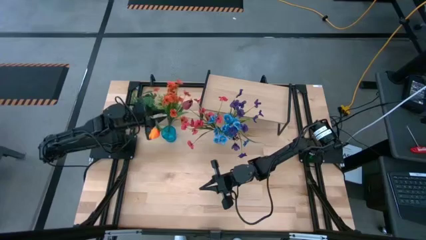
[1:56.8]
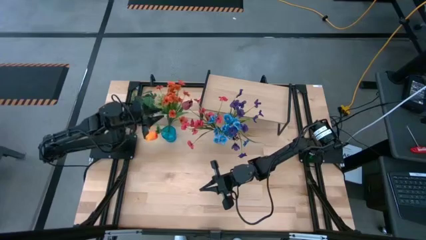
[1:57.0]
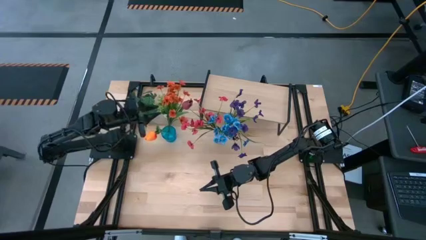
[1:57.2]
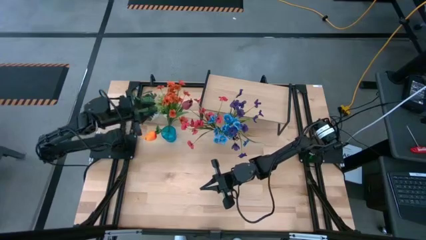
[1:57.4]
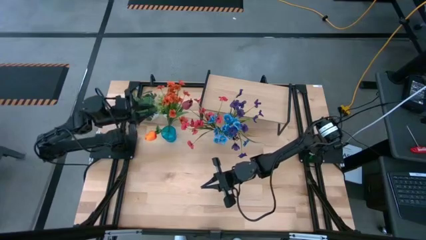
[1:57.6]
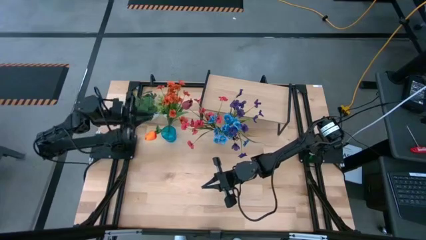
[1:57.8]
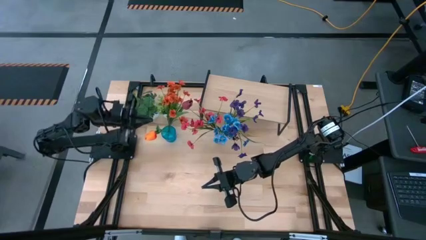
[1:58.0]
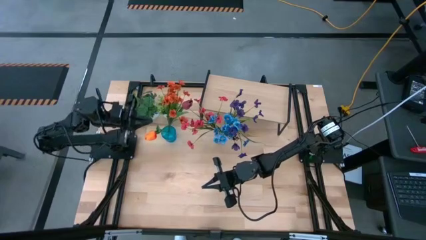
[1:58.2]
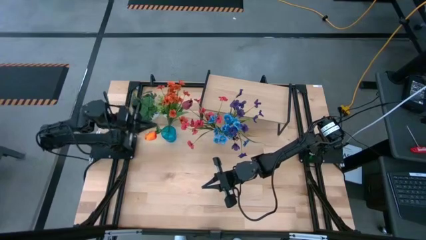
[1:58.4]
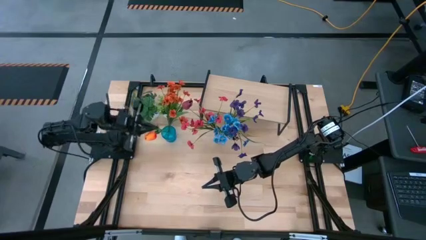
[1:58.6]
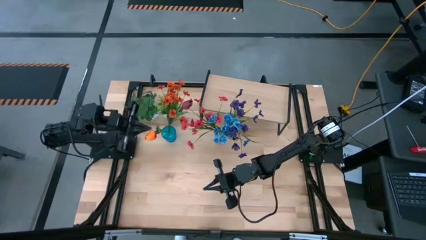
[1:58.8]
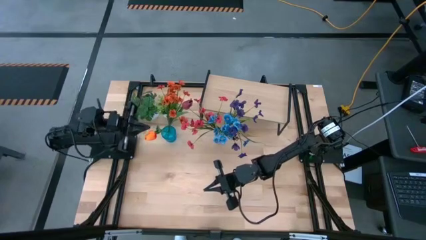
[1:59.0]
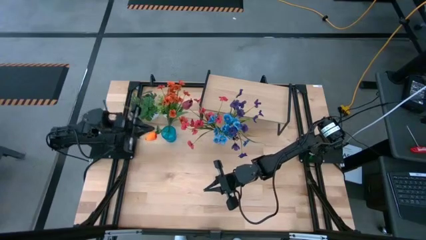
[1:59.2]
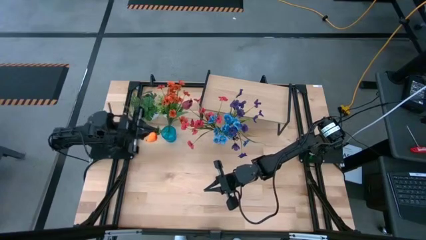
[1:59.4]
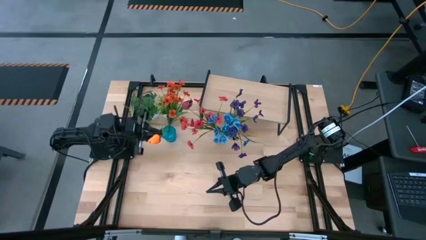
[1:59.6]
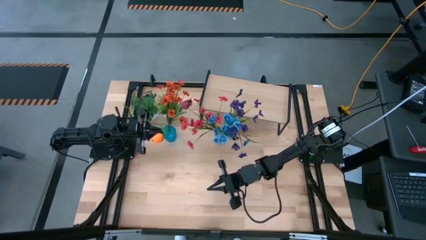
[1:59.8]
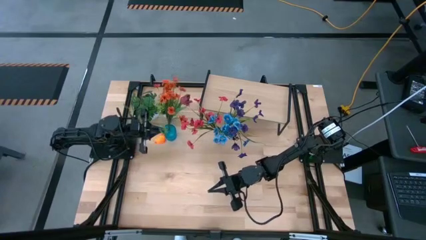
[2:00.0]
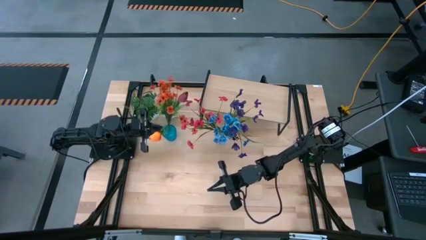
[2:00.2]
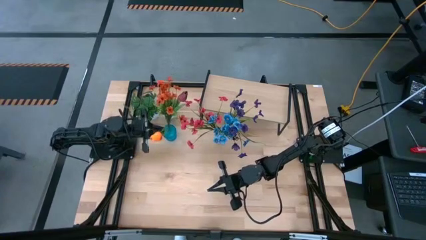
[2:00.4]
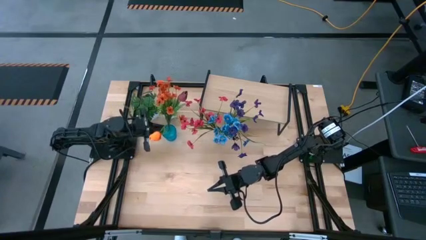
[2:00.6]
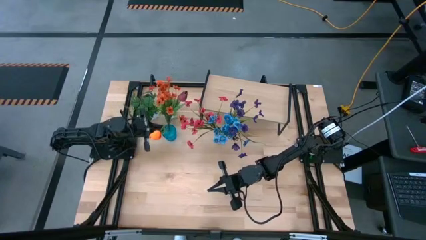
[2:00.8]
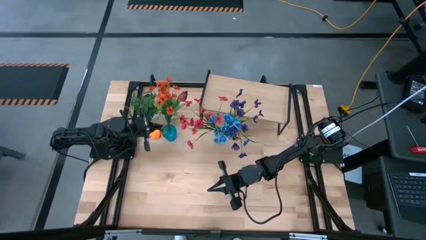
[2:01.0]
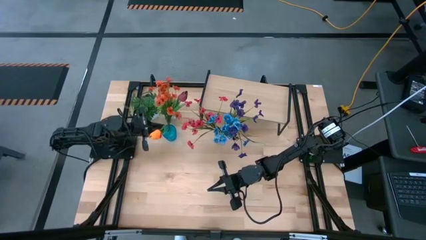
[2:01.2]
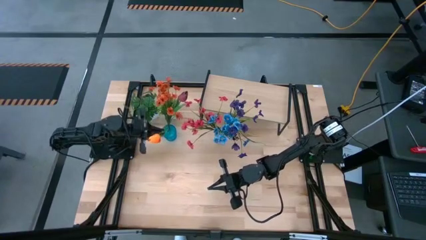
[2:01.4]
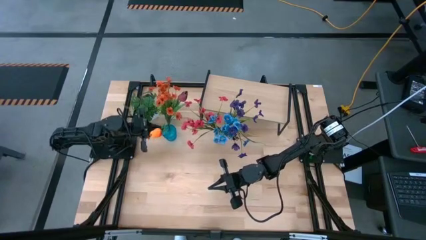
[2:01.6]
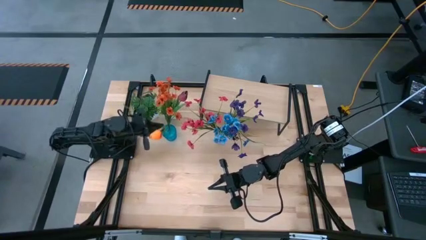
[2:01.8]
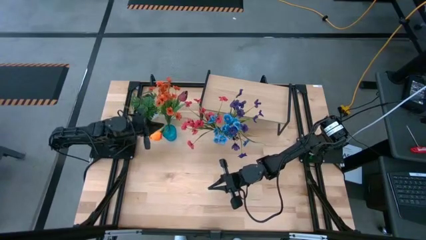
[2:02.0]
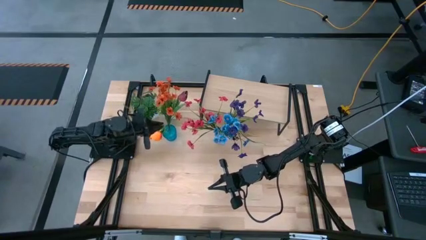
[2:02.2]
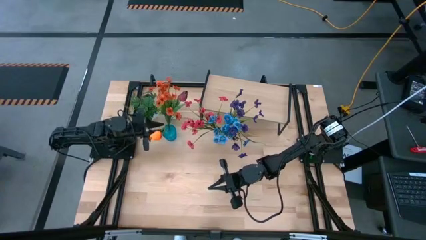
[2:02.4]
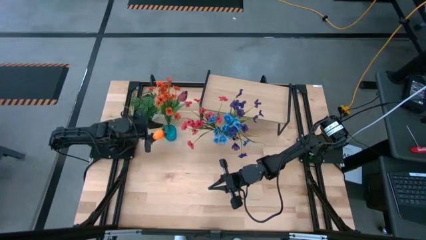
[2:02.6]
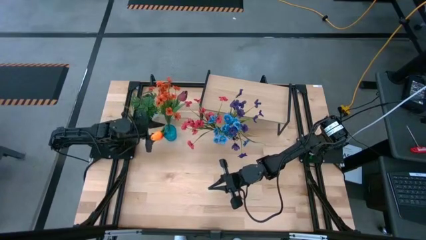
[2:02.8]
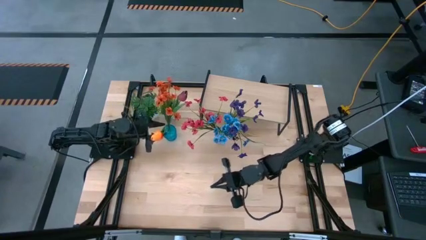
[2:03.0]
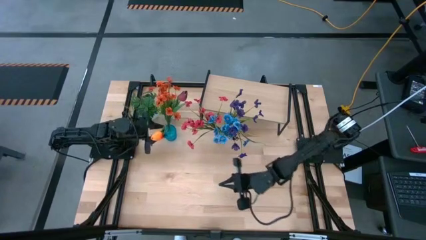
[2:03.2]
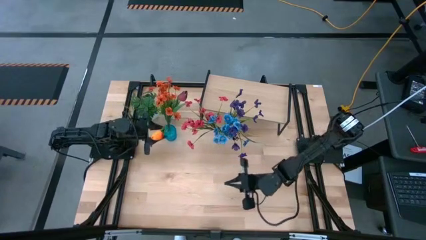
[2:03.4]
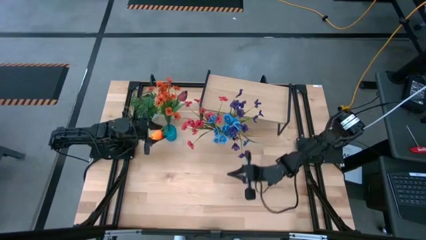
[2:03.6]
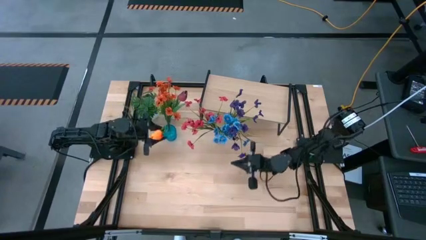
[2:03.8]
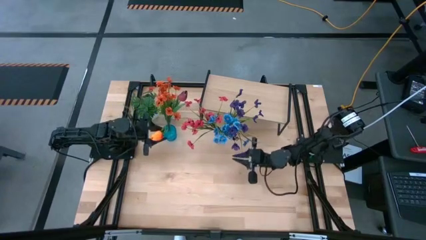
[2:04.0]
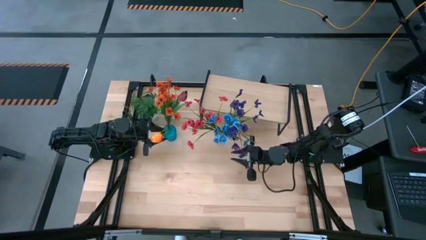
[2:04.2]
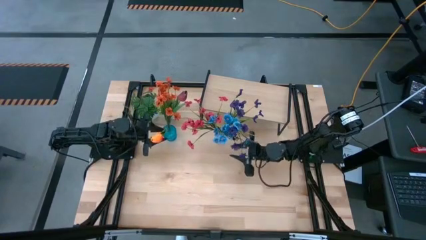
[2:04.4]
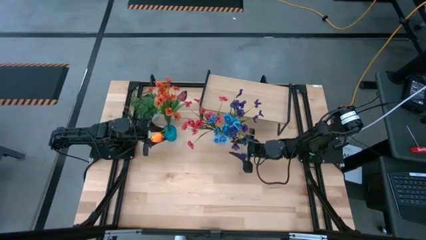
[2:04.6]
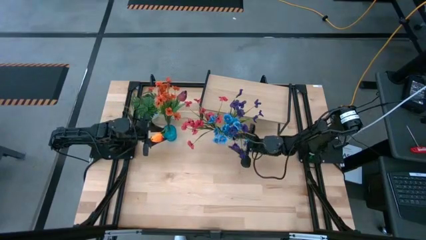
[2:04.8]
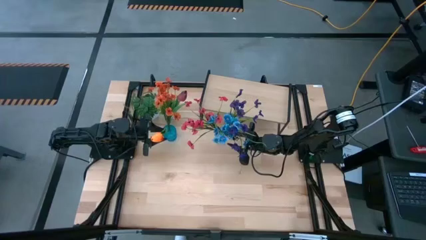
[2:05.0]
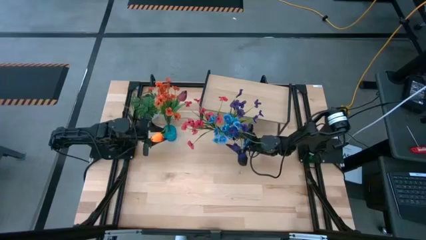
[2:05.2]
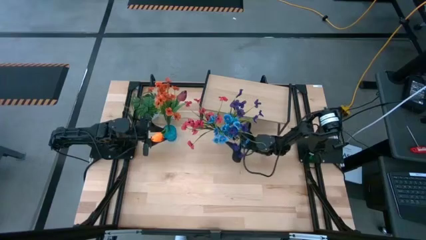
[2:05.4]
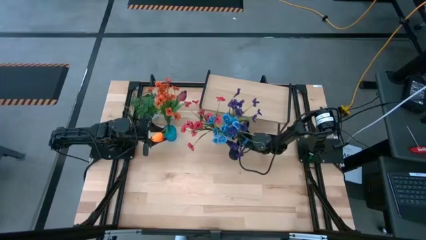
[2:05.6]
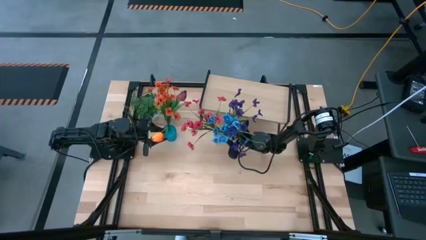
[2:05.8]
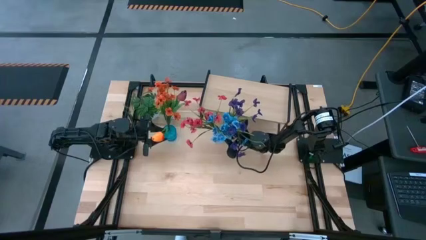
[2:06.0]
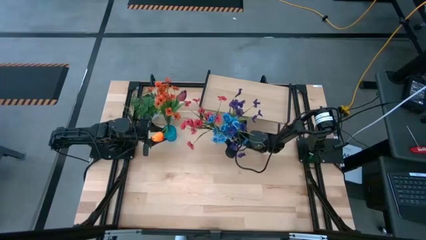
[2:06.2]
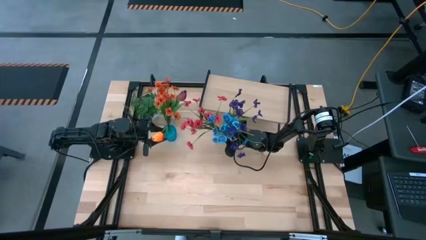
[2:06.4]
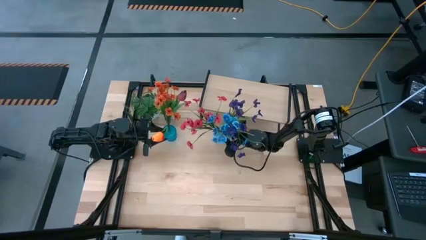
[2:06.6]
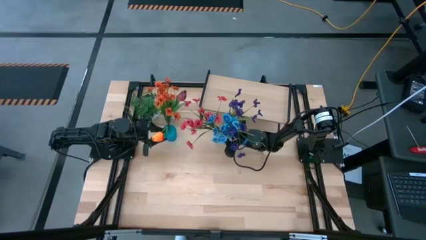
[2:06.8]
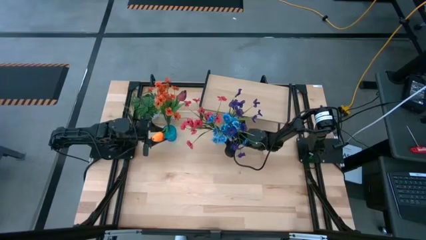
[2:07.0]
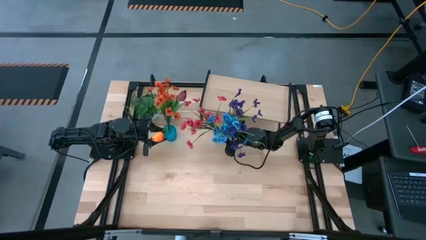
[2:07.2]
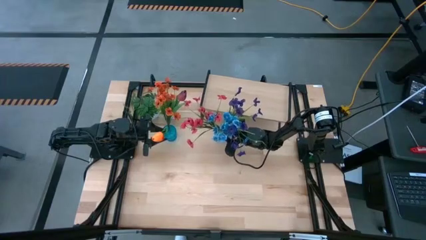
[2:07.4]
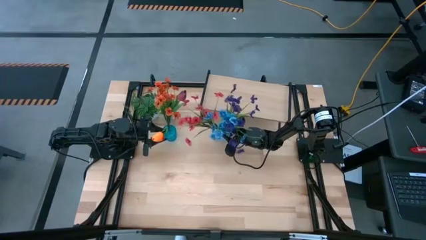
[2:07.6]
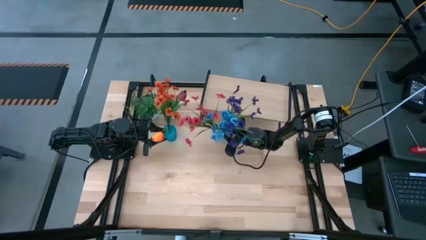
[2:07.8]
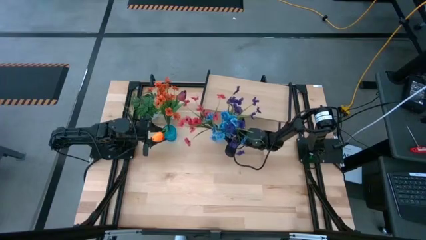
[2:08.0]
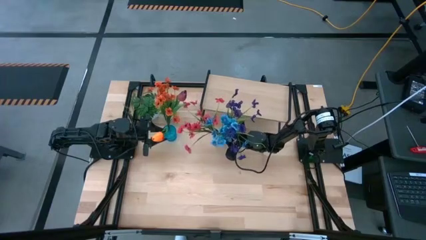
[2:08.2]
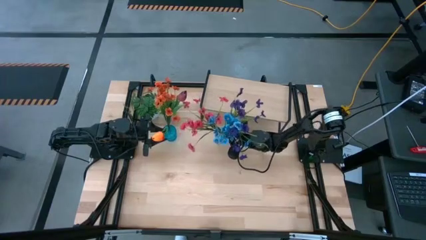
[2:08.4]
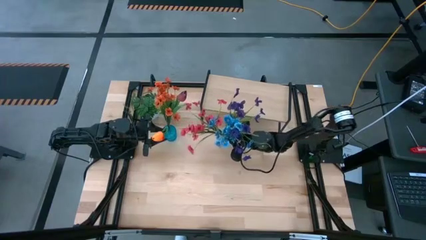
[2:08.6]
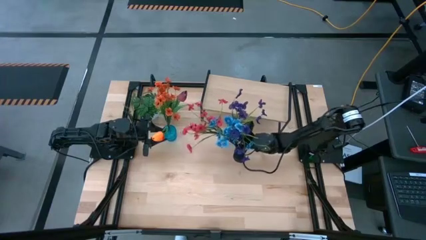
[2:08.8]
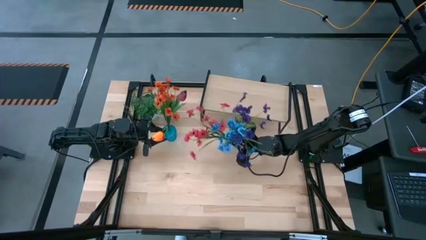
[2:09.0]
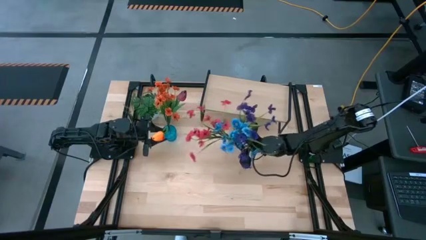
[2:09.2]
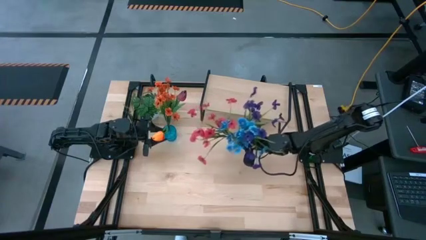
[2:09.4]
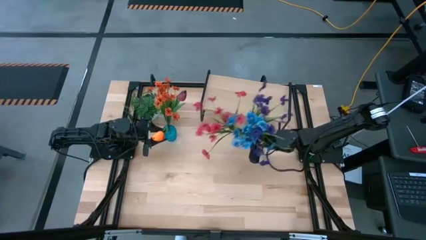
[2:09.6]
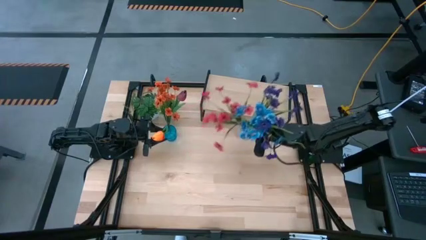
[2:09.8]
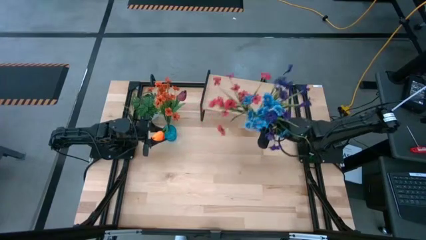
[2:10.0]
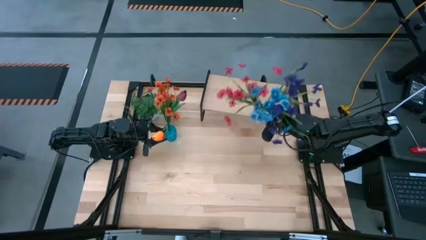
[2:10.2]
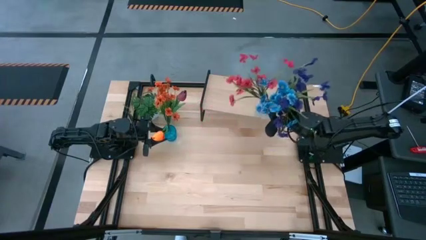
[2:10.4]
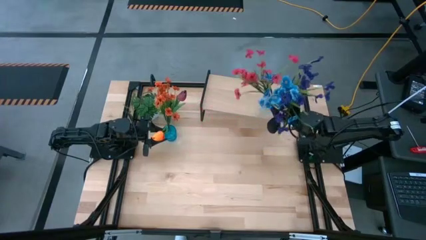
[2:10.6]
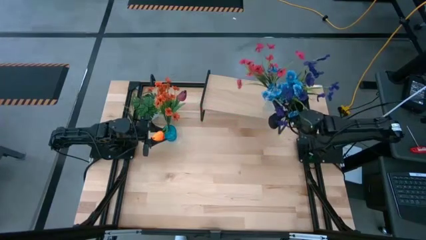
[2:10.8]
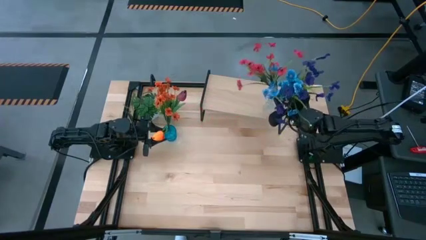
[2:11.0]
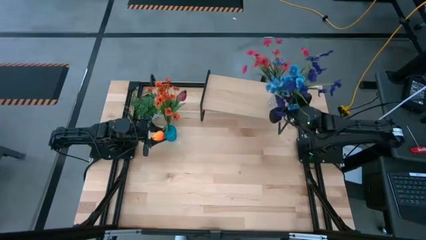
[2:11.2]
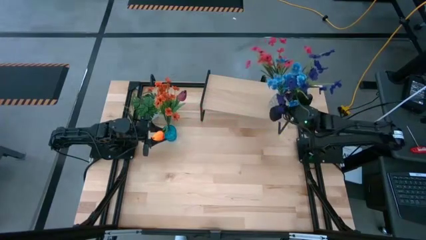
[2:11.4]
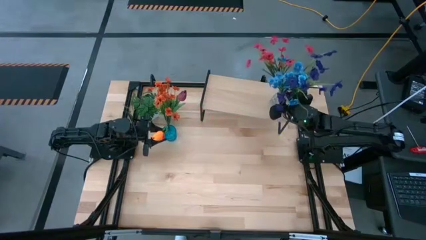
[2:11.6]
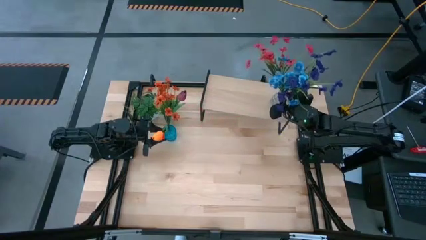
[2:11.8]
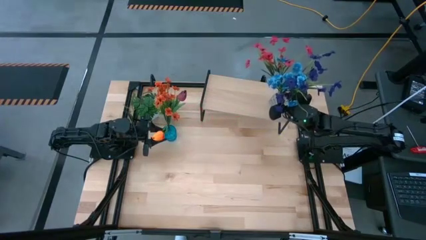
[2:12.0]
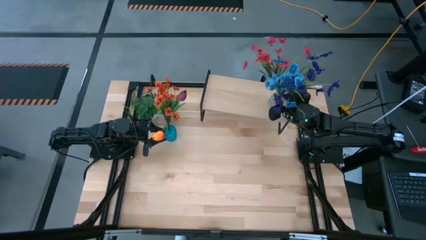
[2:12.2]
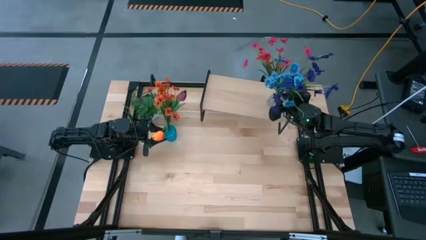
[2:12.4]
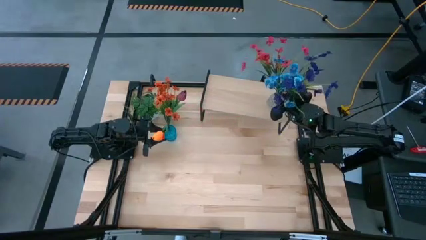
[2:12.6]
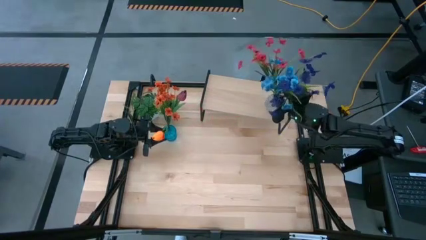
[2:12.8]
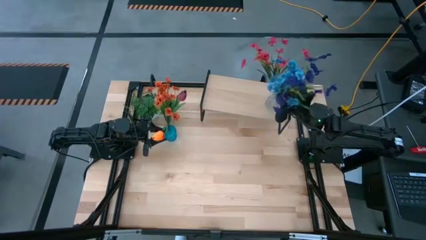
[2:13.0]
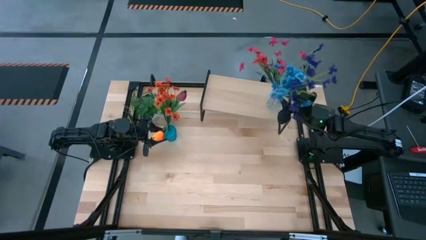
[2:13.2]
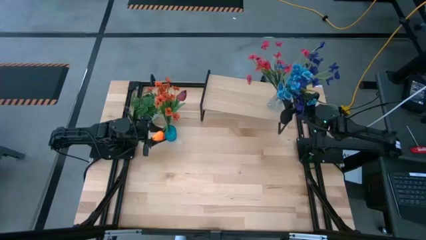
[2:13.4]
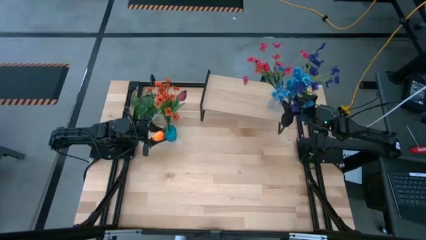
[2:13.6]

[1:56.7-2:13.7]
Task: Pick and place flowers into a vace then onto a shelf
Put the transparent vase with flowers on the shelf
